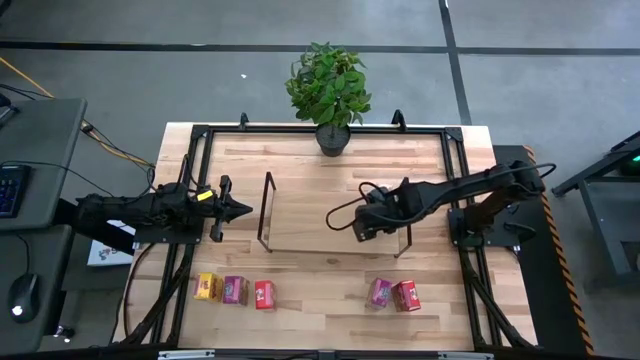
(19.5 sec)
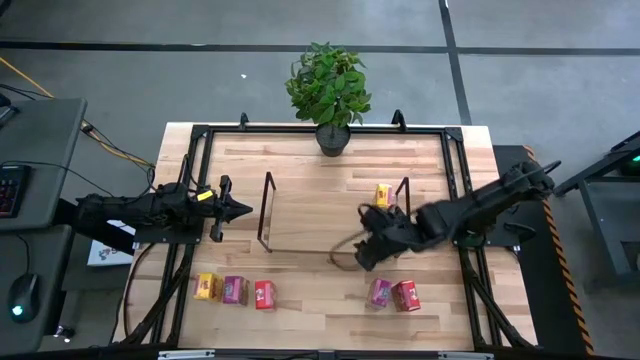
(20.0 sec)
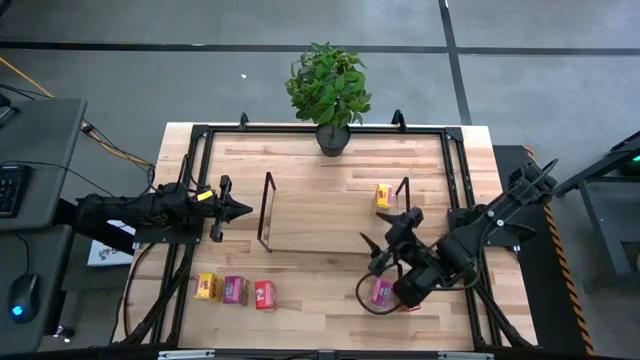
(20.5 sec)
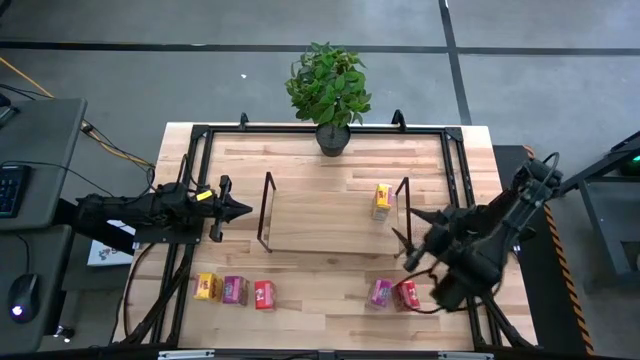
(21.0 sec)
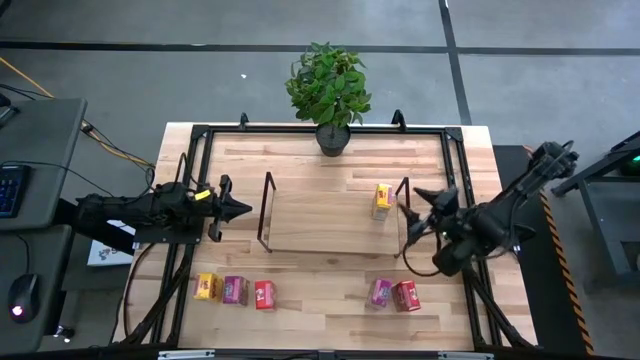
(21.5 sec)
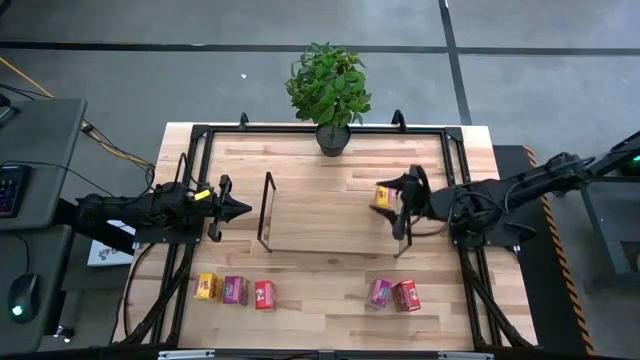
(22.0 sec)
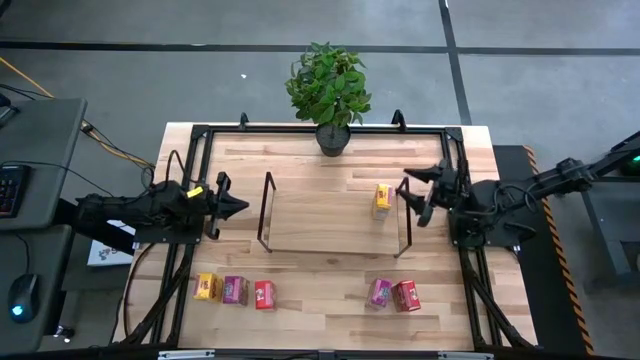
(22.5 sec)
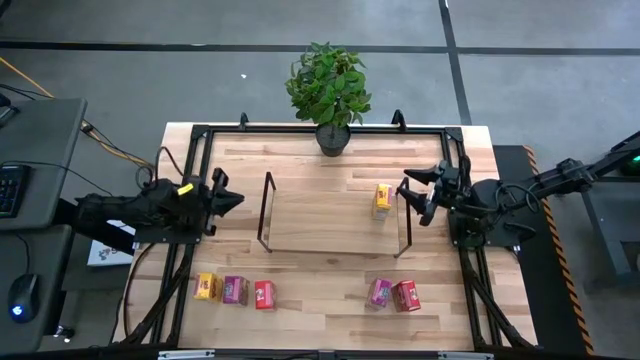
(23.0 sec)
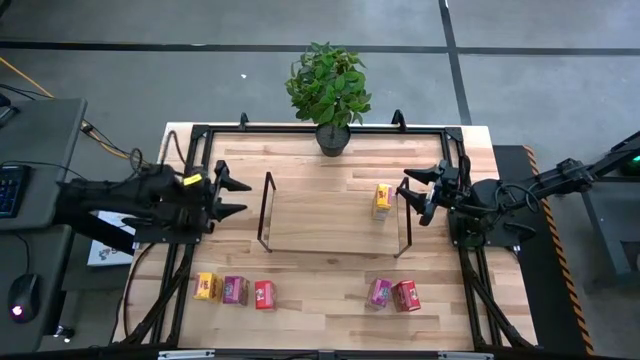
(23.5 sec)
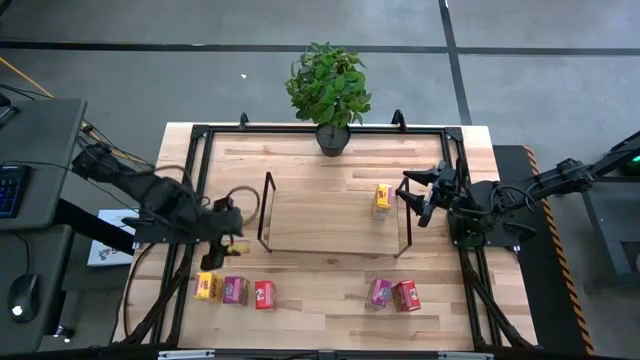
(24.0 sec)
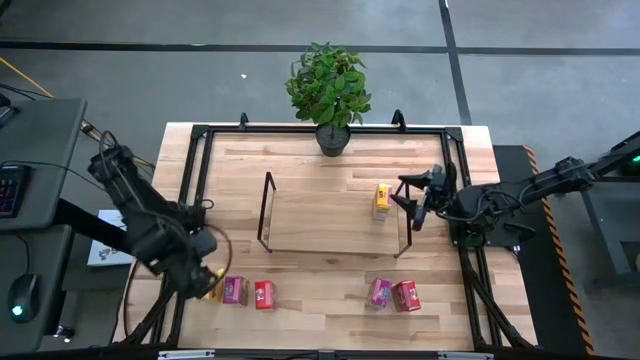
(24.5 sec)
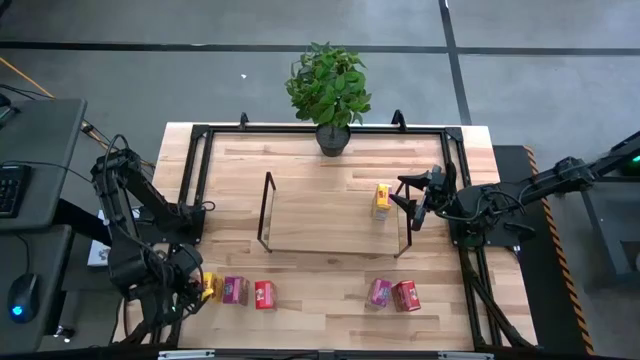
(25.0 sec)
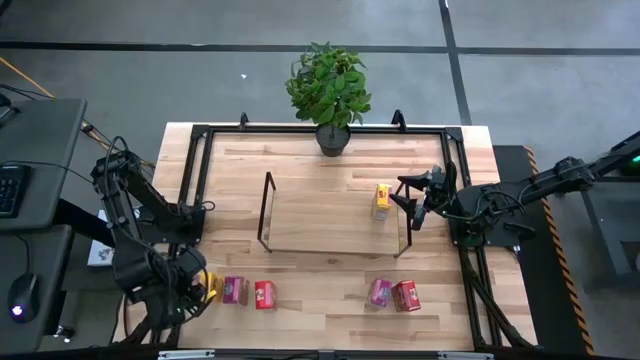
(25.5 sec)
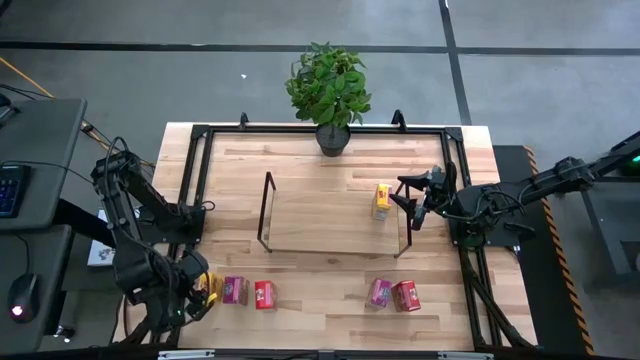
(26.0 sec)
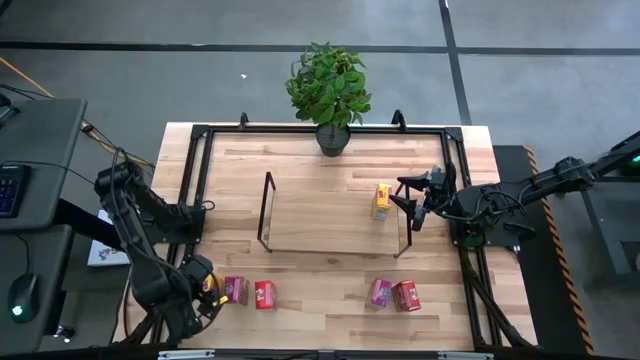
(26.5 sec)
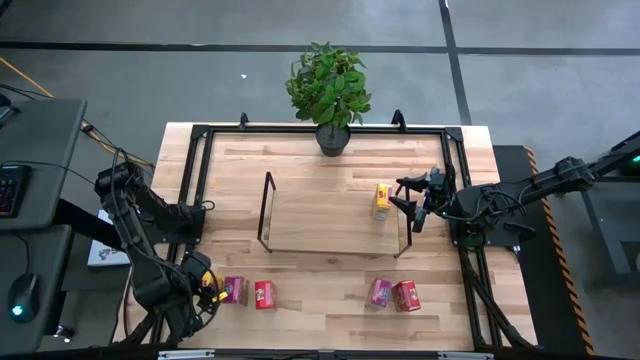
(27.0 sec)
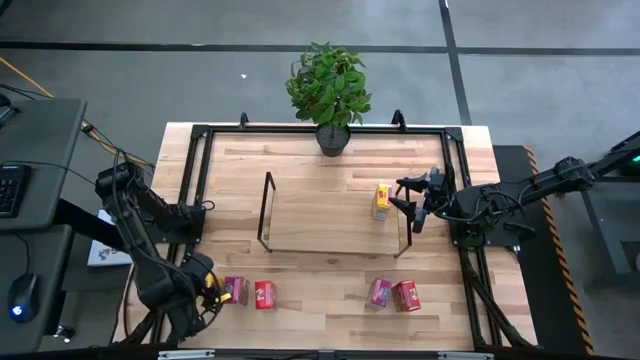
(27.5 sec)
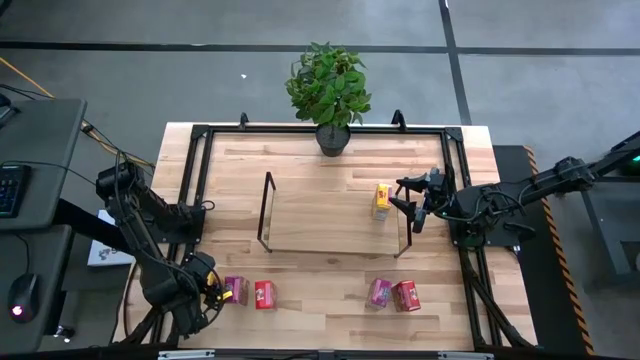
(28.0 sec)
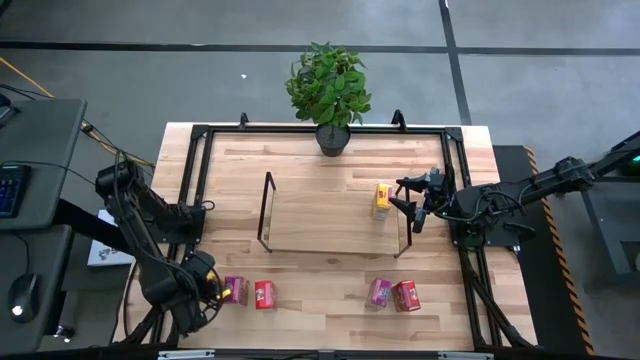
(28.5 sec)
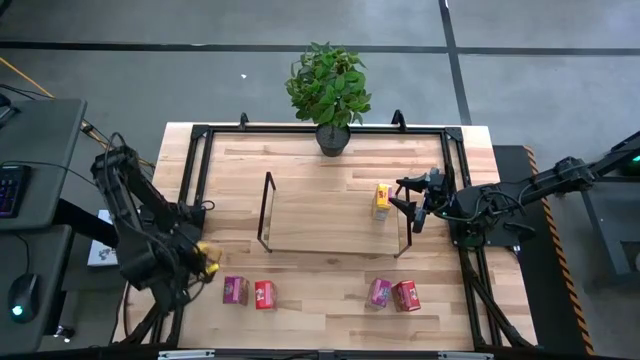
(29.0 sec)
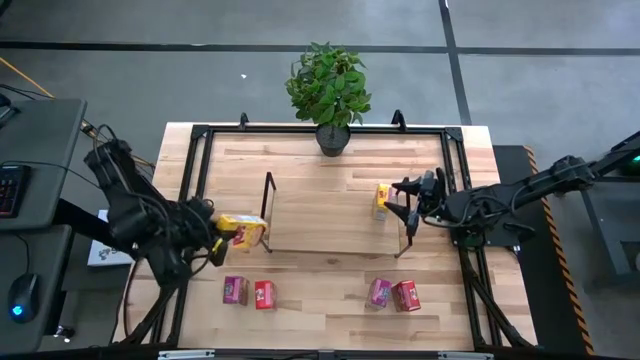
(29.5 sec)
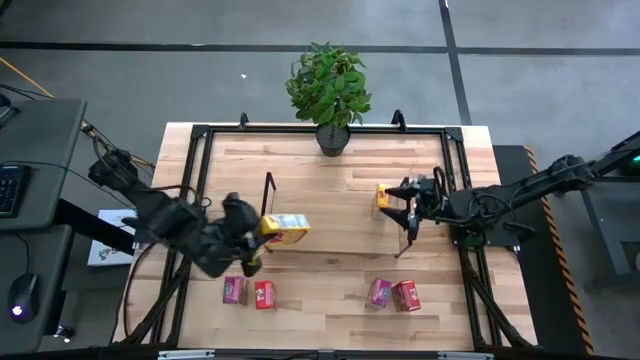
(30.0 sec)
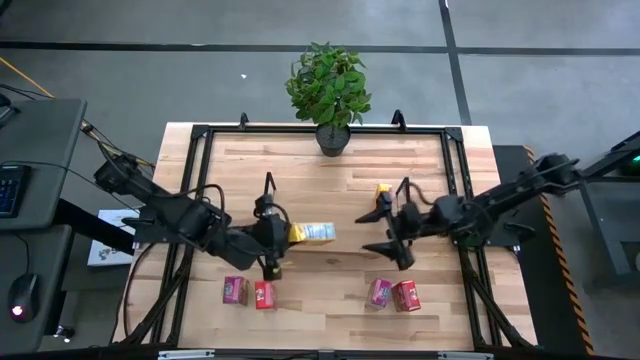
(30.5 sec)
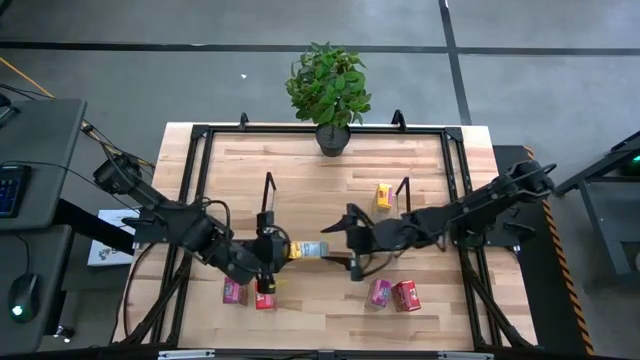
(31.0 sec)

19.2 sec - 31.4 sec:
Task: Stack cereal on shelf
Put the yellow cereal box on the shelf aligned with the other yellow cereal box

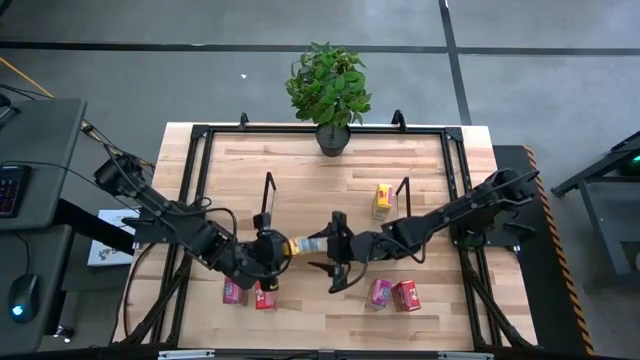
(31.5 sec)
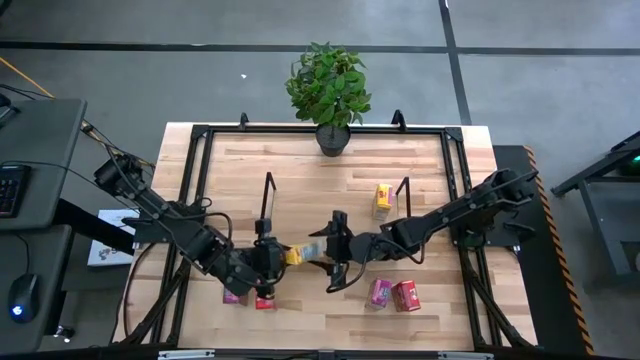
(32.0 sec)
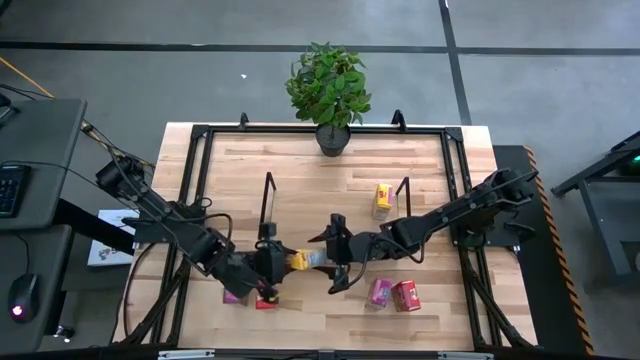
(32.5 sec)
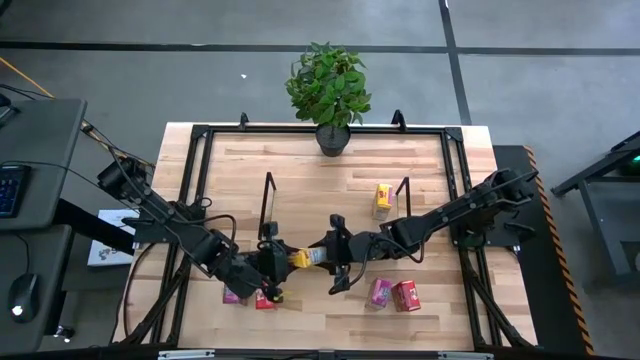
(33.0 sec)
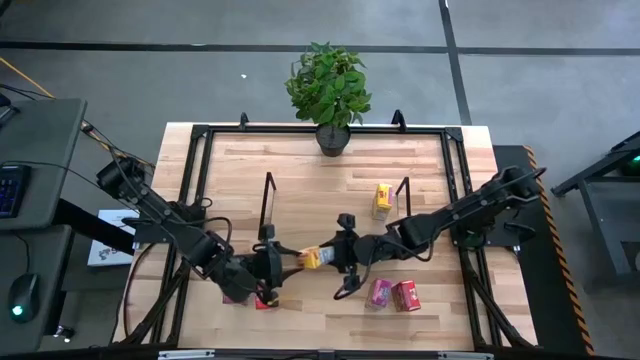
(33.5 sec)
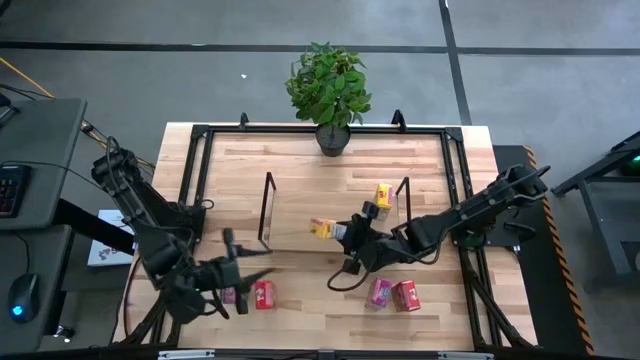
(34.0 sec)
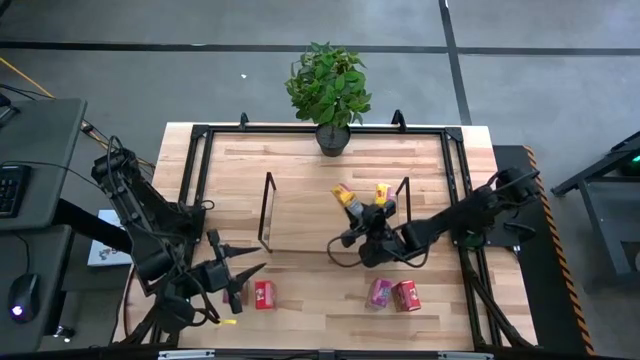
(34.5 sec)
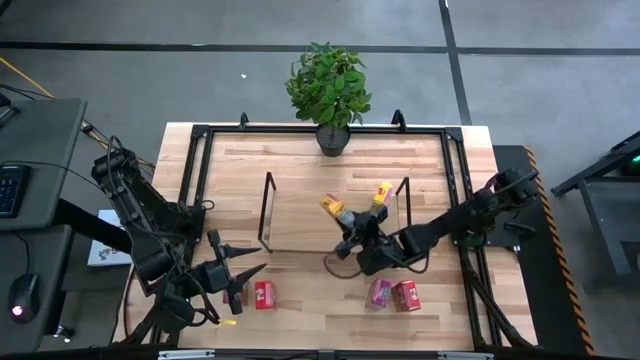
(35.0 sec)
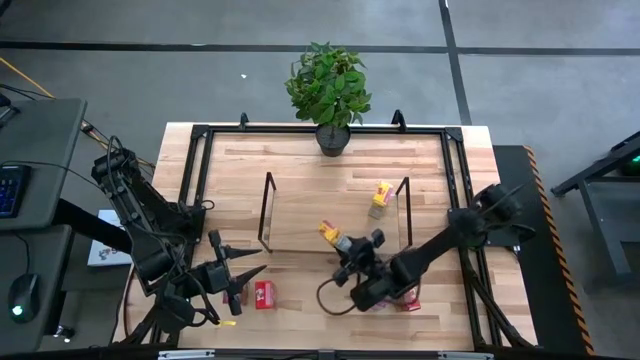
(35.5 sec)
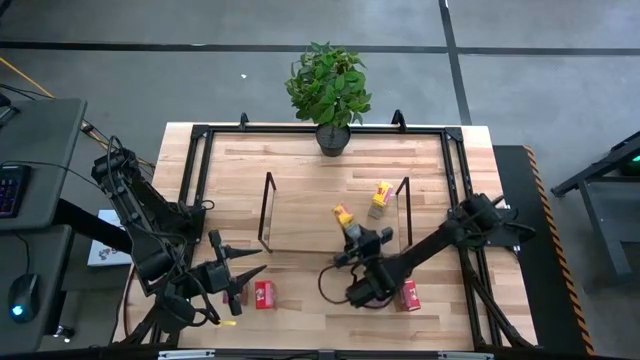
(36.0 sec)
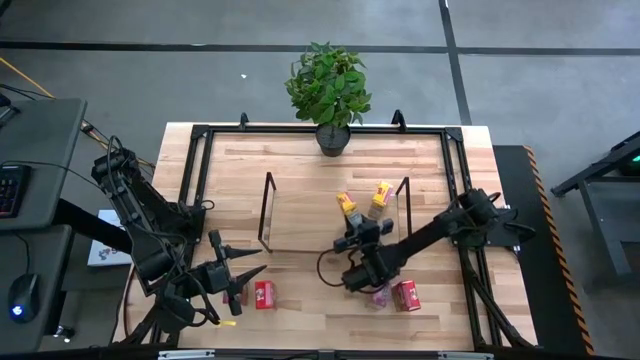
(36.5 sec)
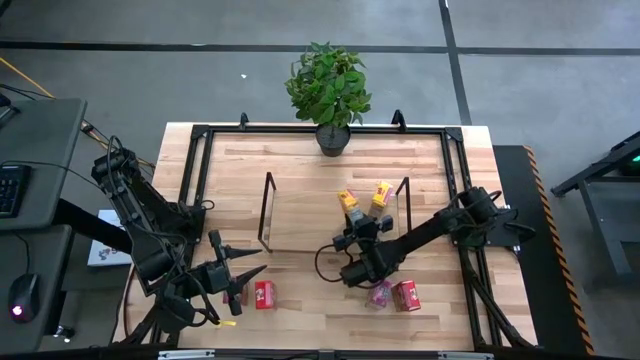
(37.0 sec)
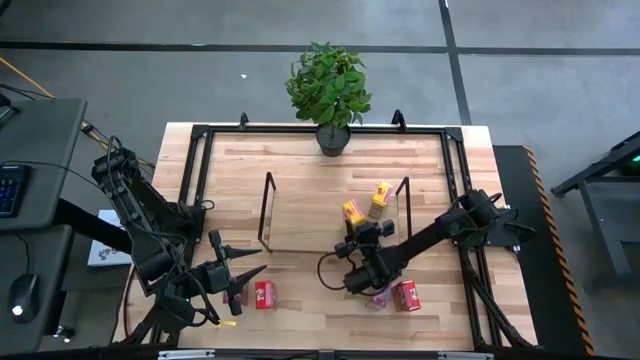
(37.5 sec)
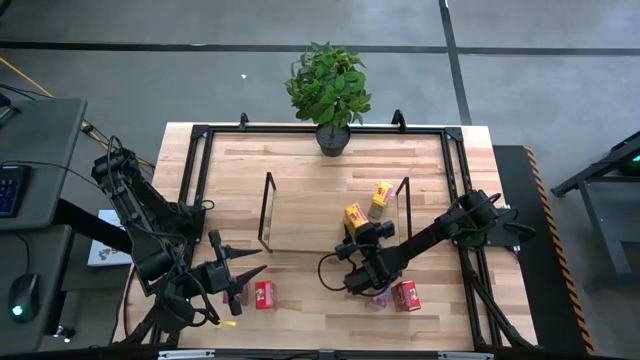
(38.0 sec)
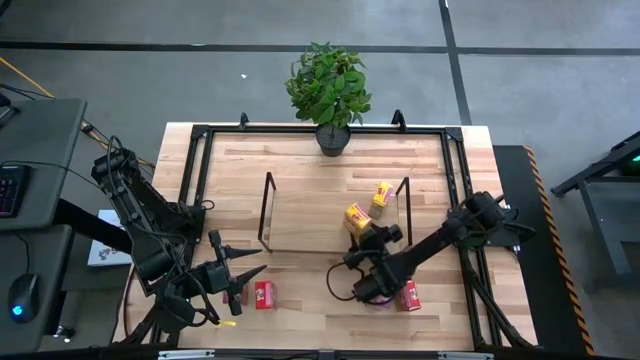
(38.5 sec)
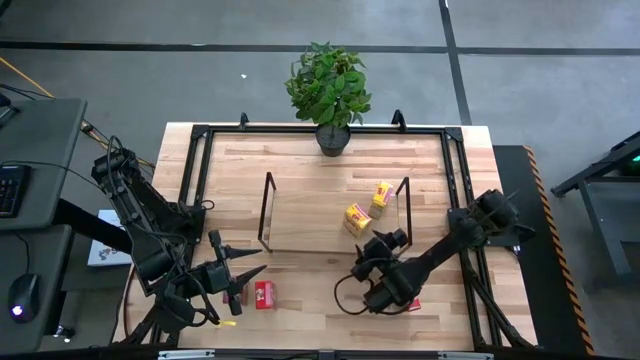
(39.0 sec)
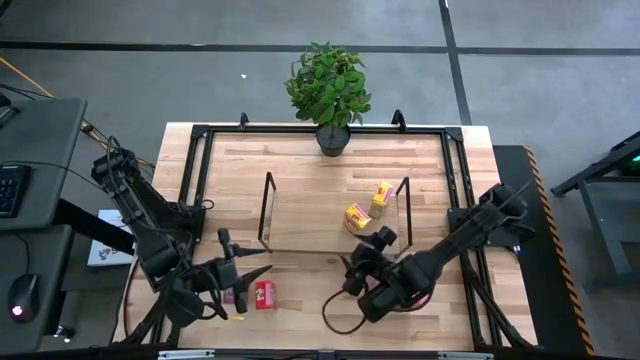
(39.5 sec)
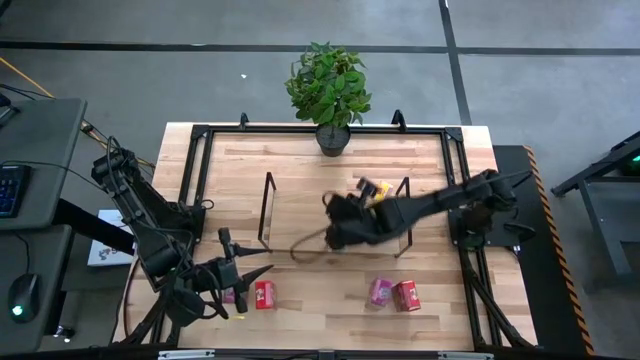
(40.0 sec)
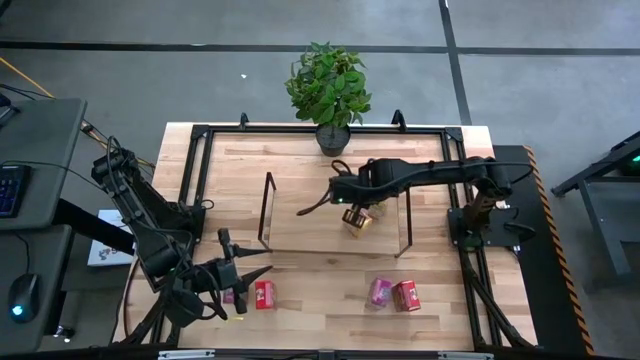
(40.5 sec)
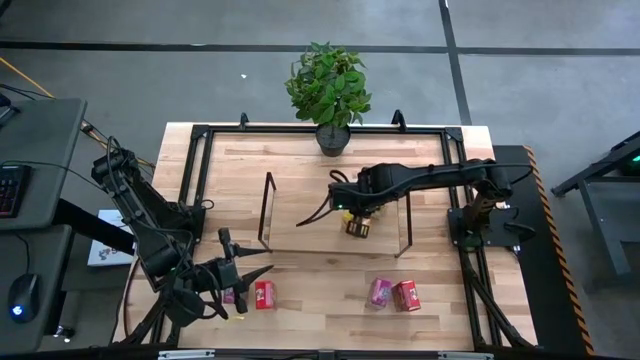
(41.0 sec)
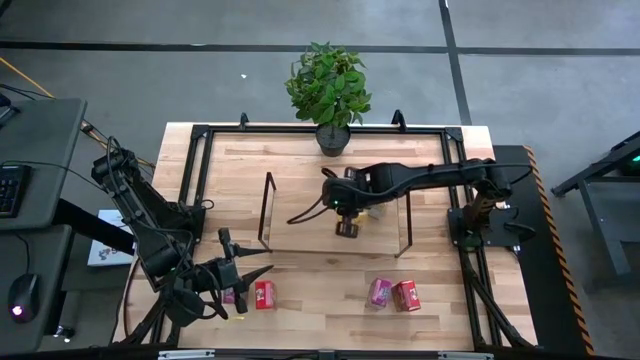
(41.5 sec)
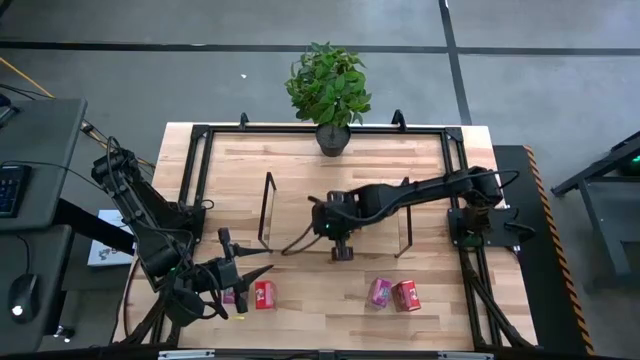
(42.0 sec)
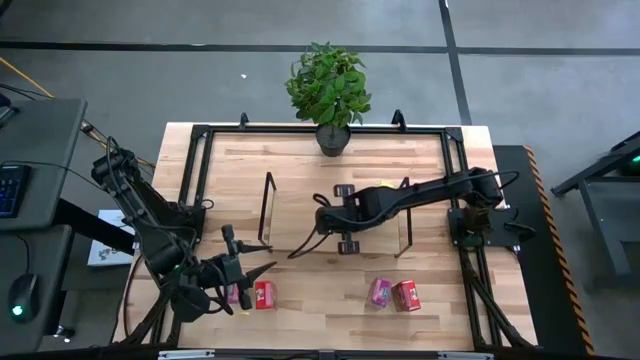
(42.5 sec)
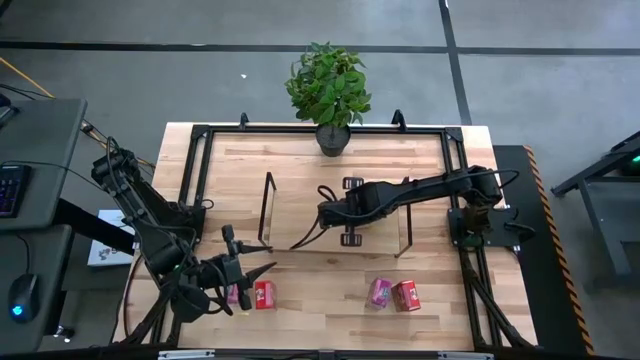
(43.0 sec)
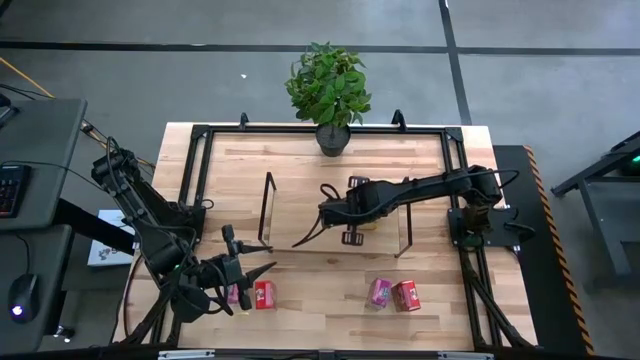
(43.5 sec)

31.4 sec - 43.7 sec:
Put the yellow cereal box on the shelf aligned with the other yellow cereal box
